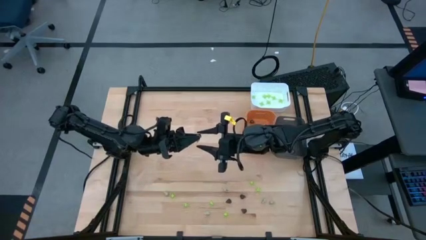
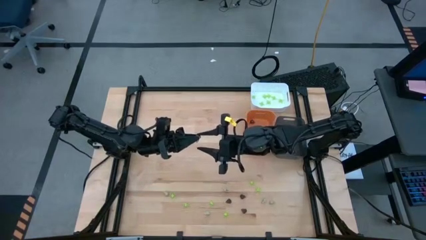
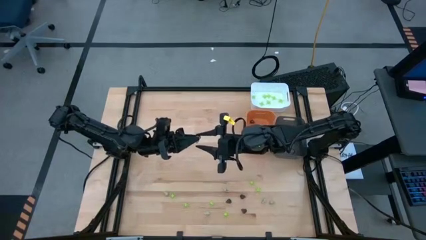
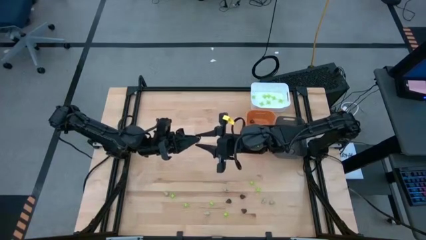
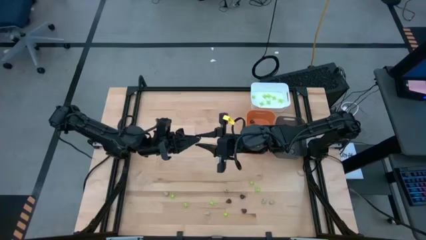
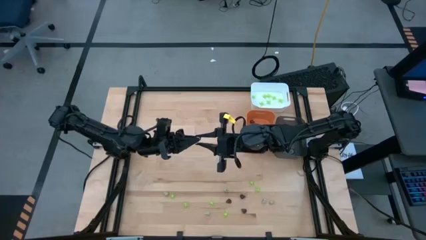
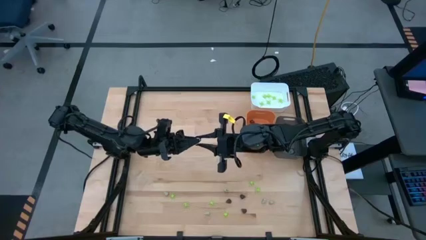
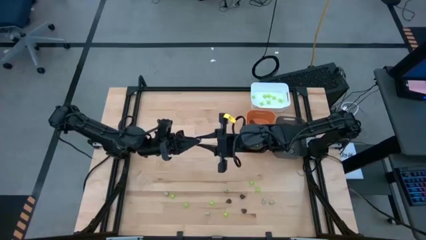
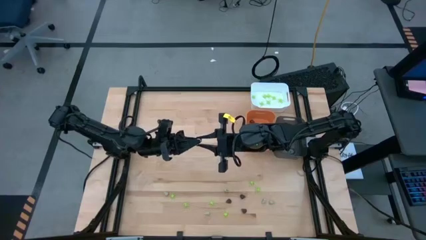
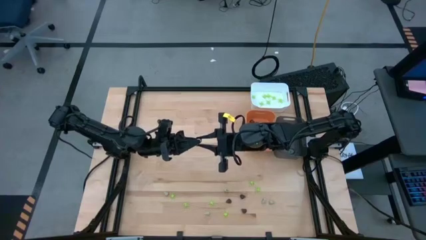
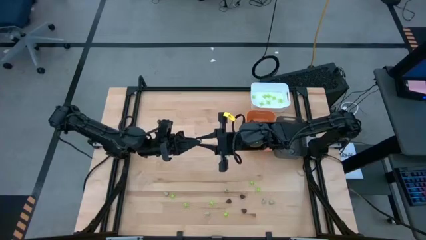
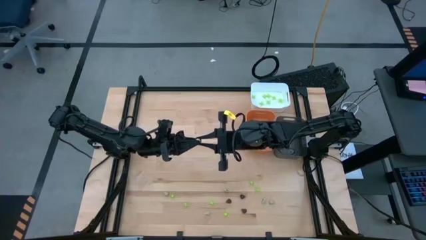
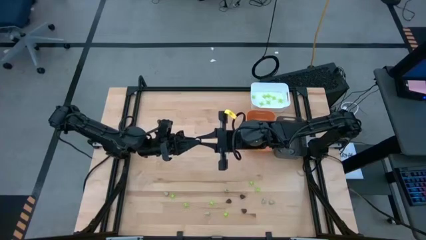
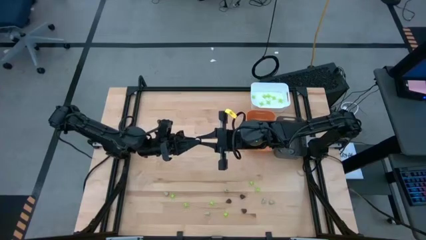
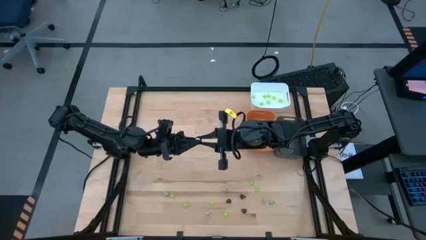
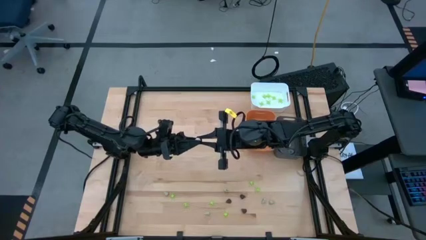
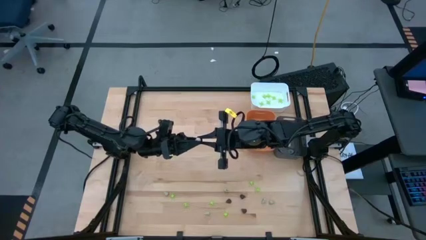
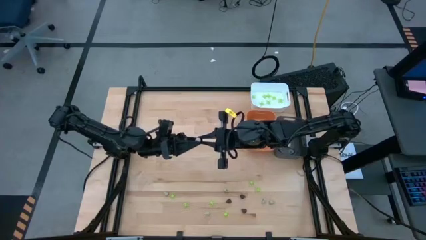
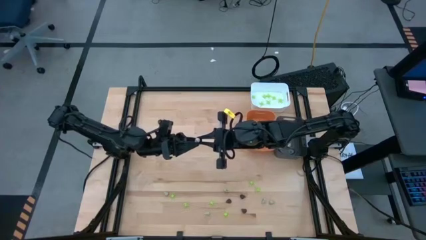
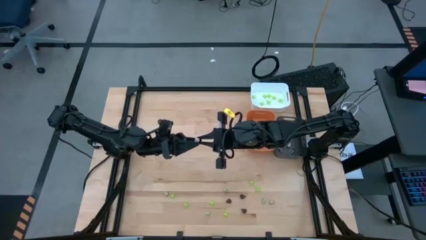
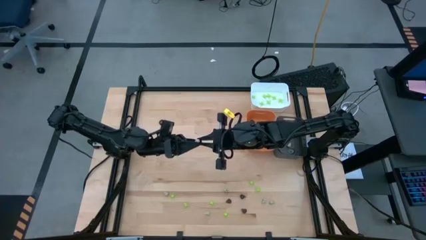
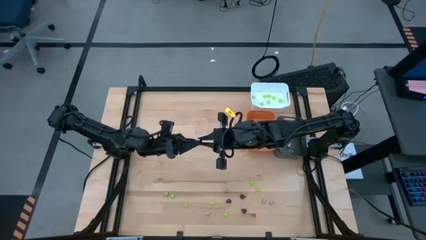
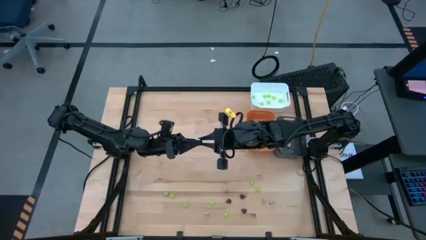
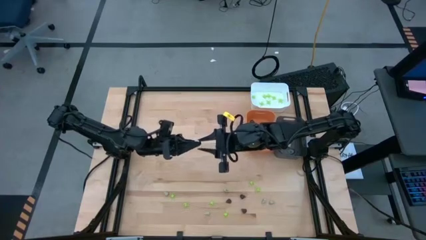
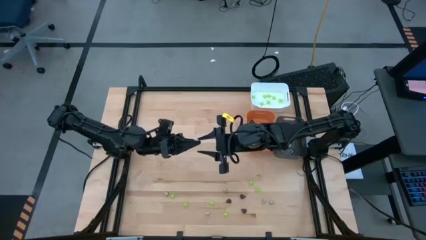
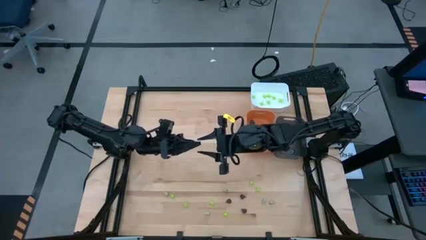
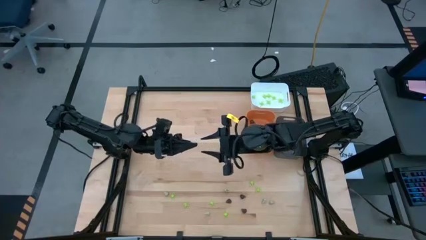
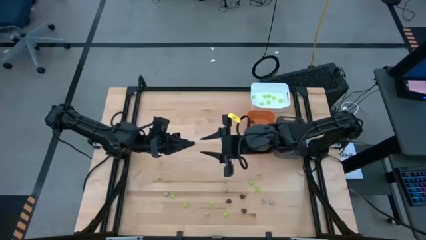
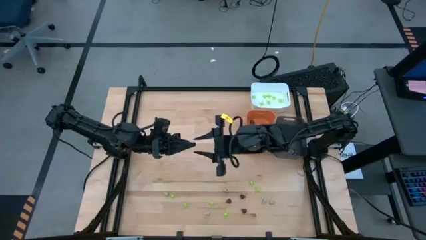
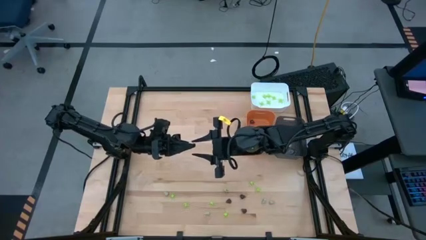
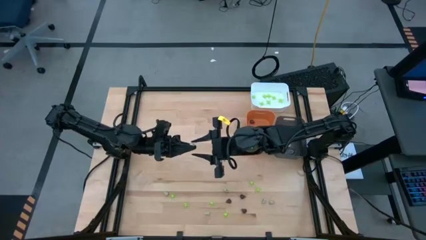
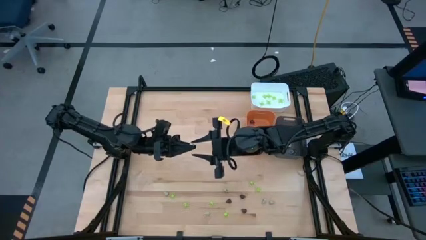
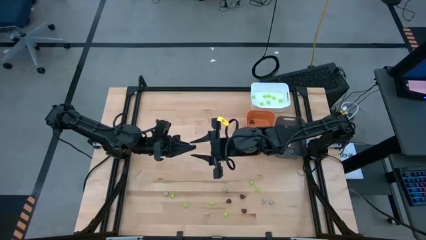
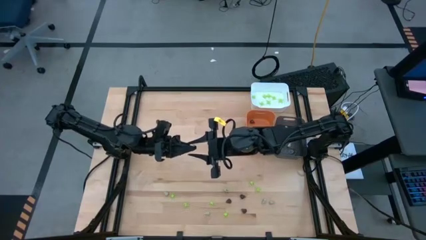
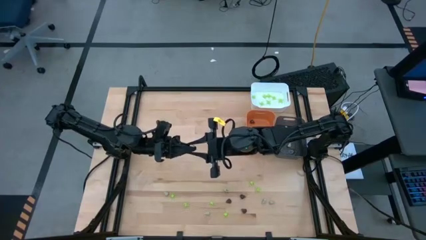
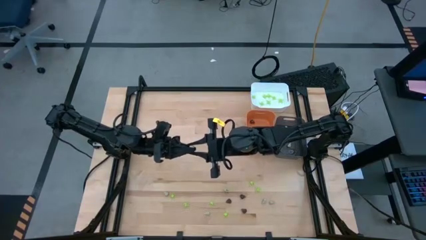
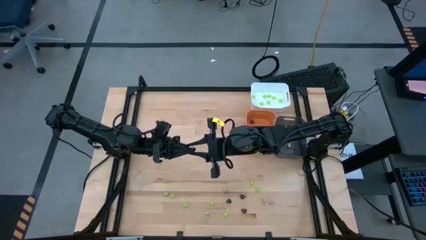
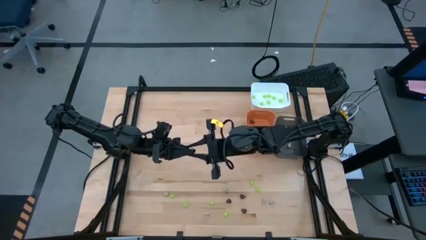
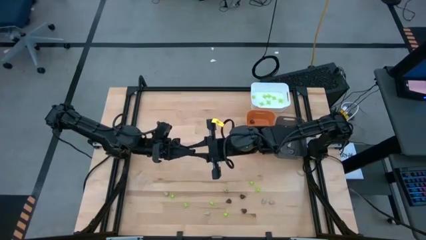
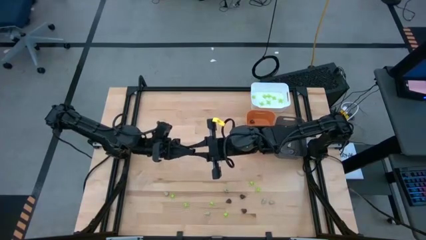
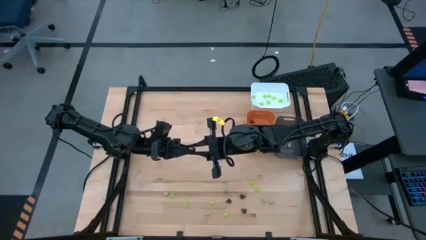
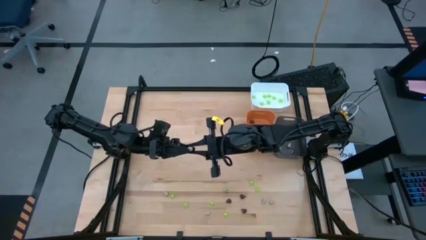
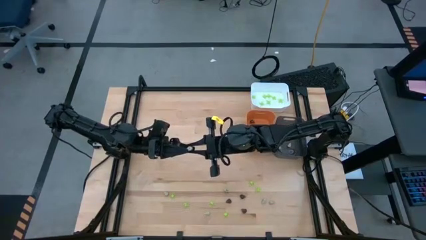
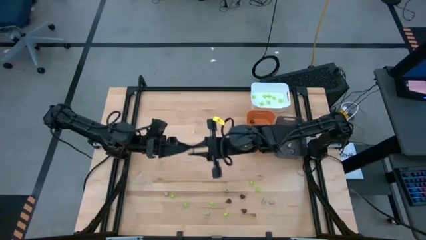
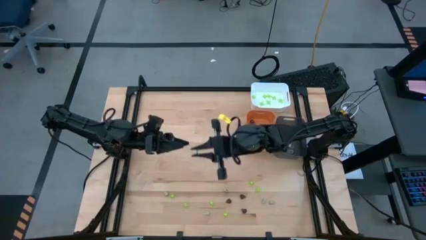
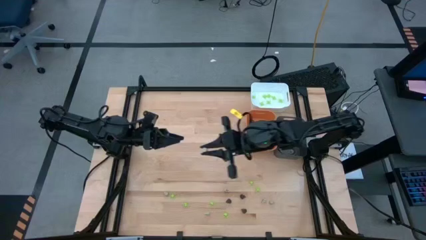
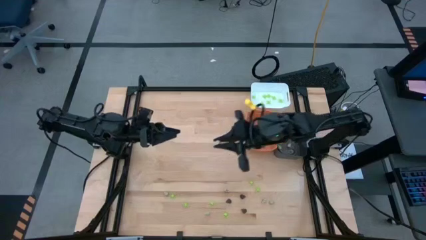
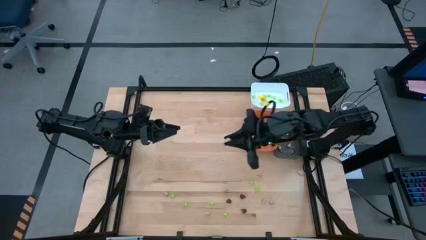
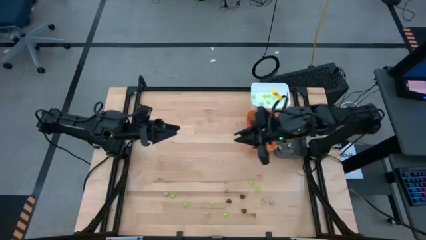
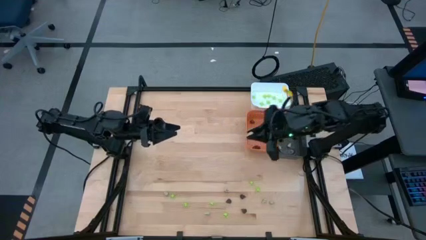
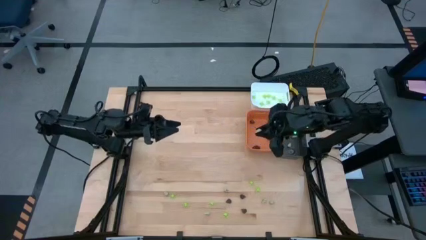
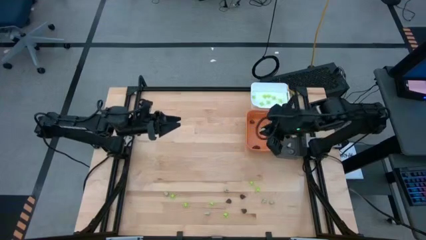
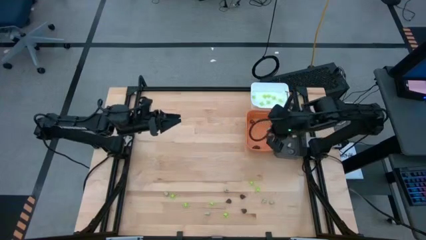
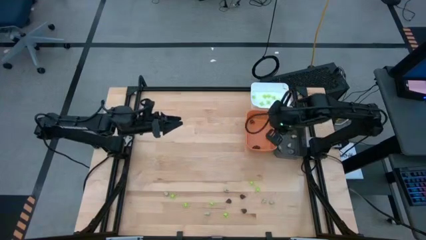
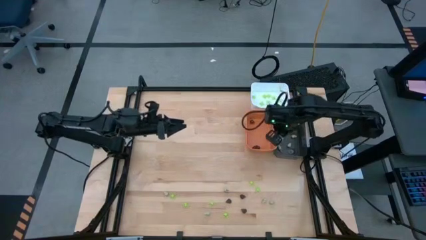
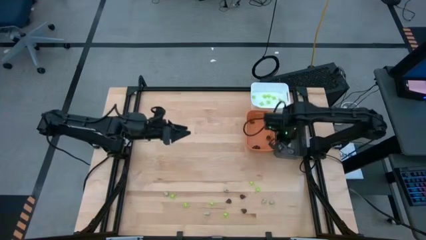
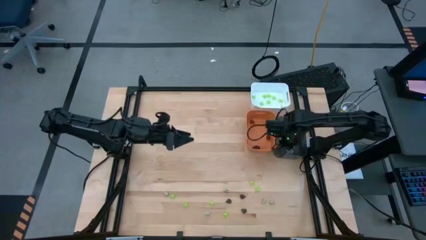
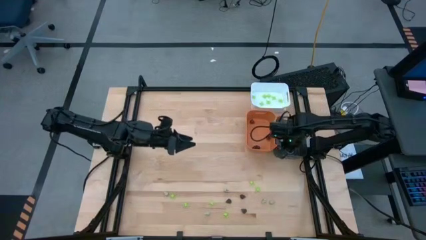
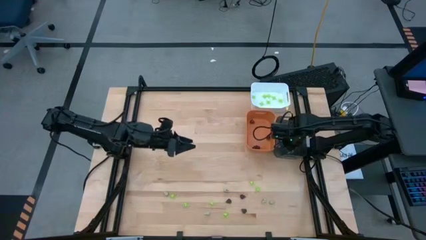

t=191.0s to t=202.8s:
Task: Sort Halloween decoration
Put the white skull toy into the black bin

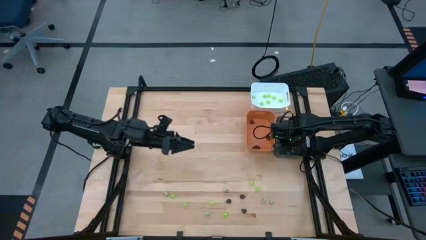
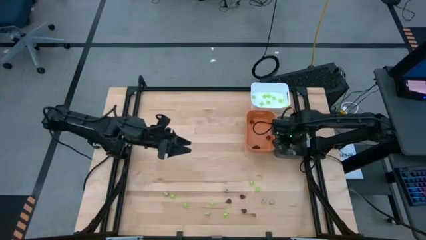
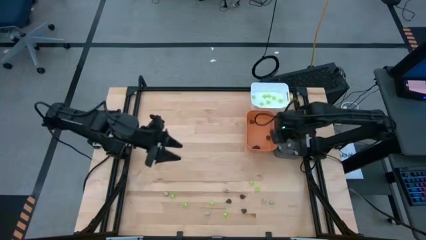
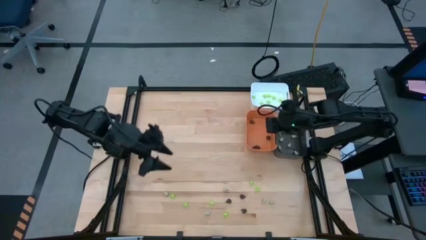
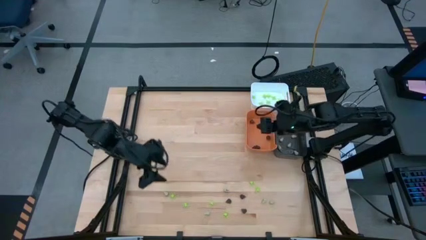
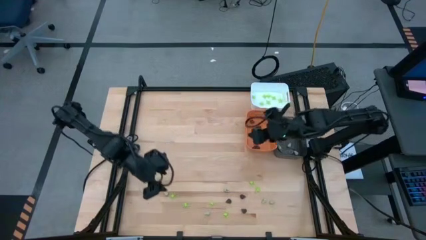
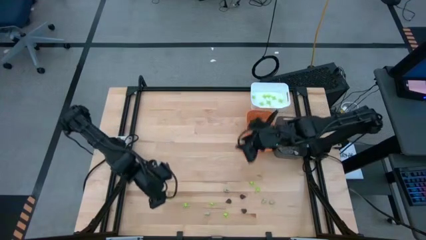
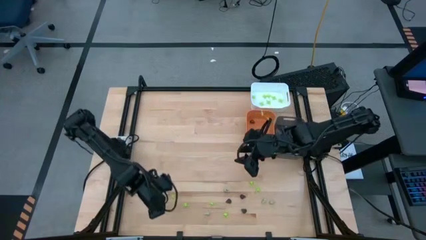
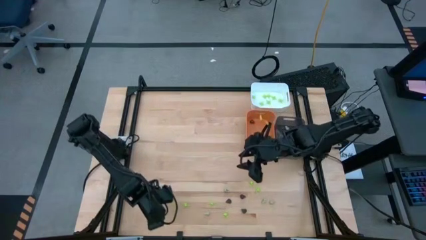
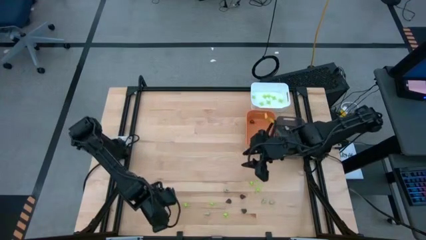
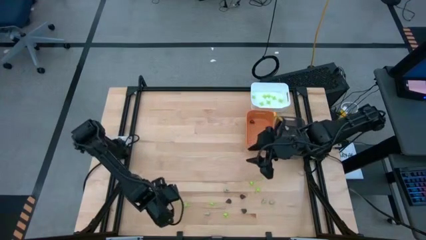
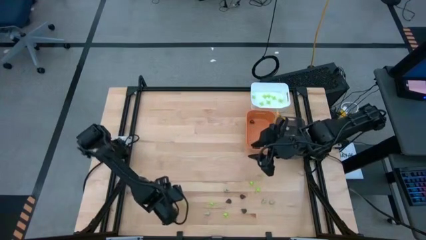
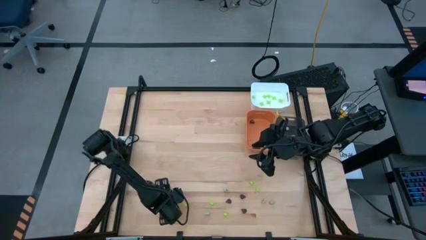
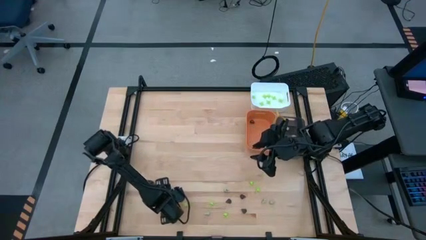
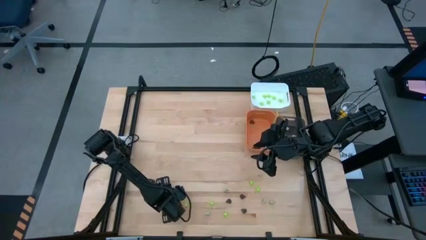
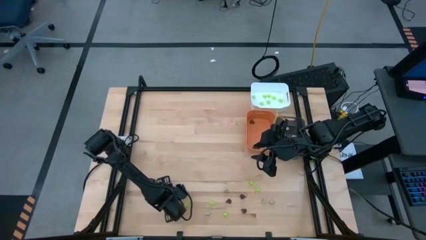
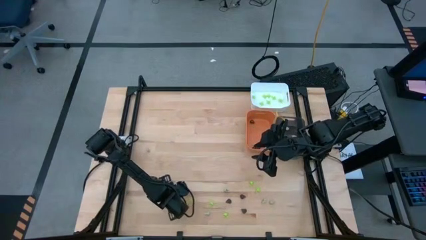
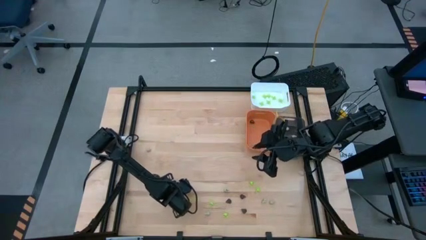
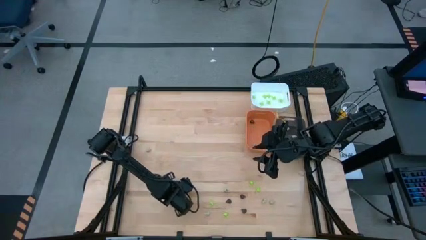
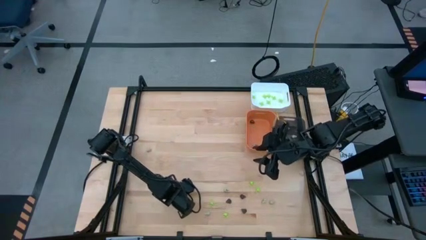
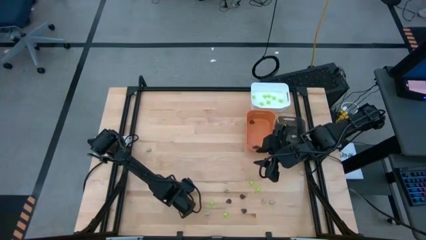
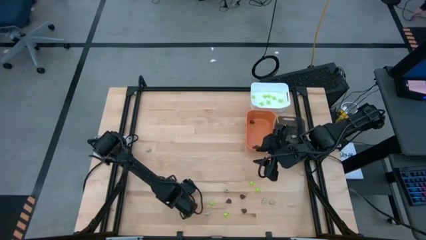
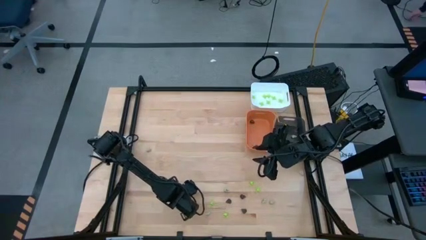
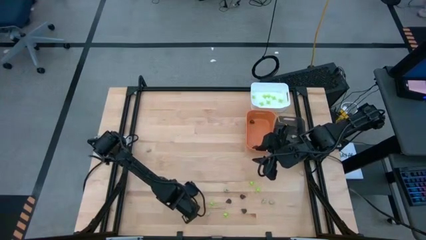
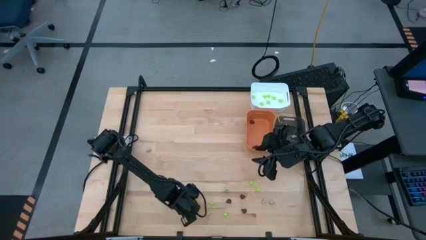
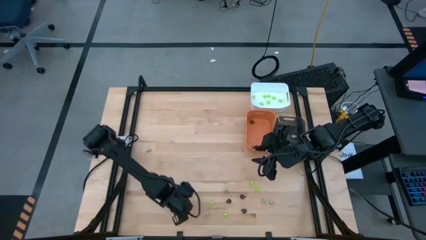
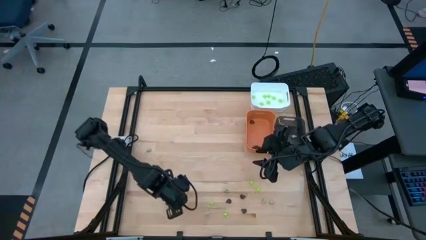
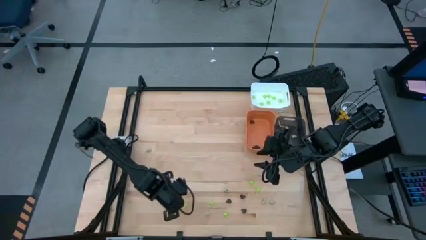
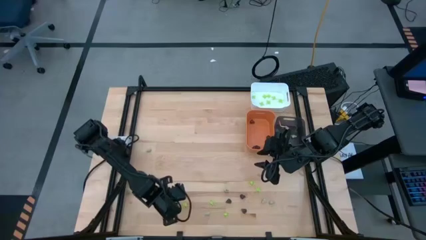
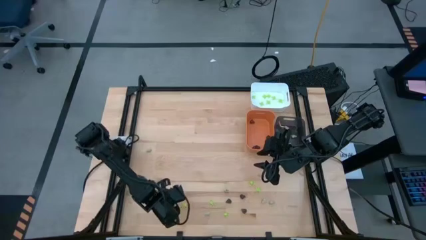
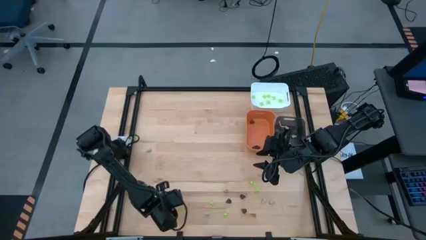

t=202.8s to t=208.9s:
Put the green spider toy into the white bin
